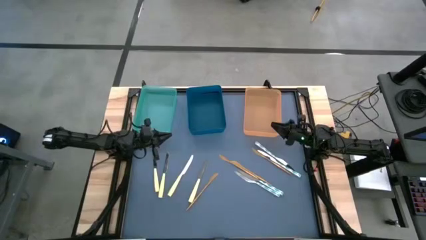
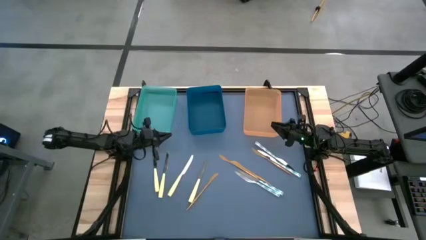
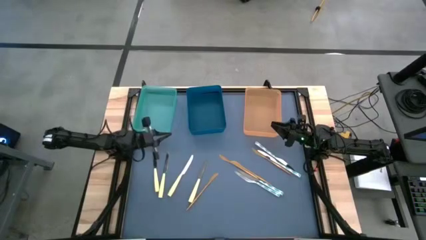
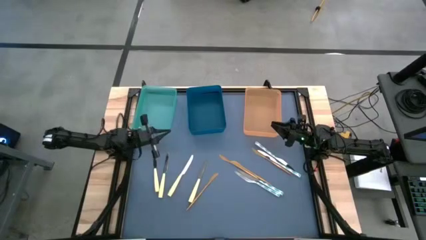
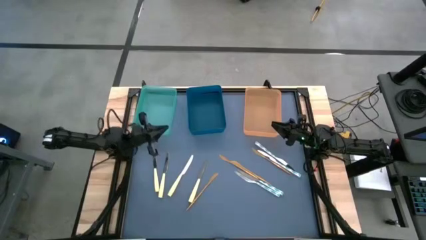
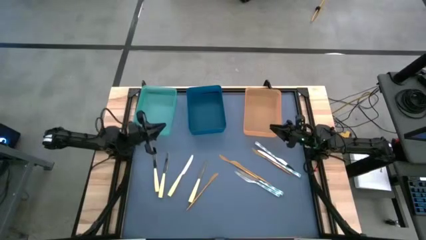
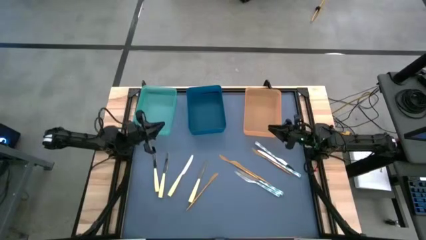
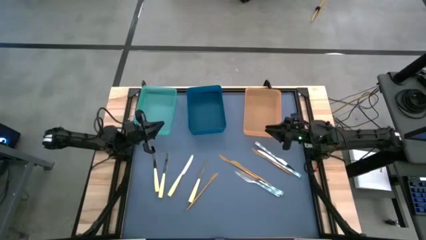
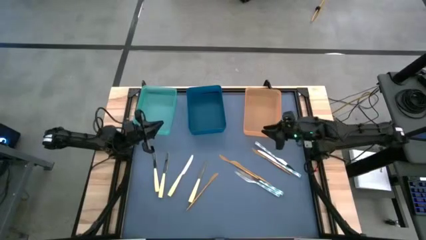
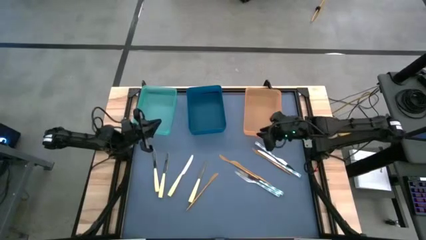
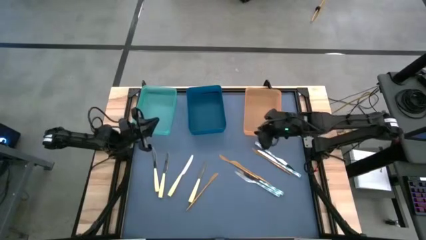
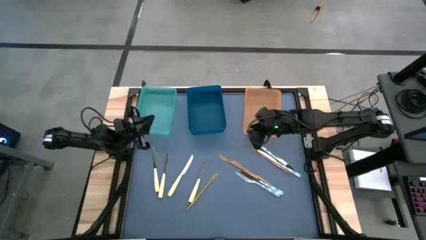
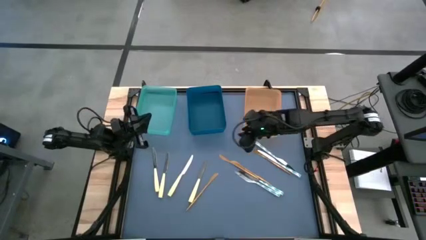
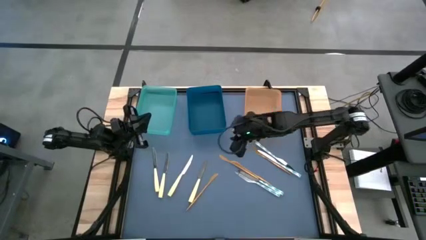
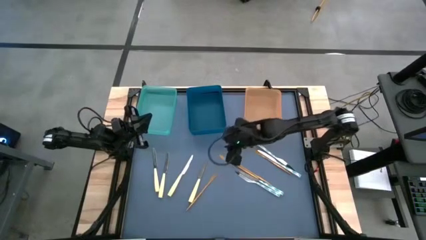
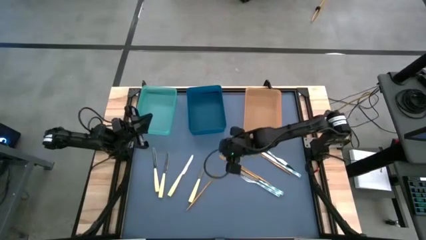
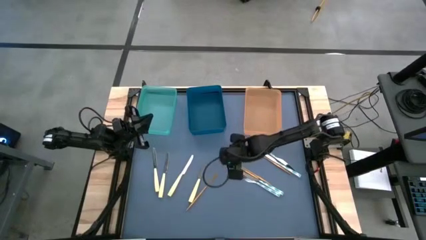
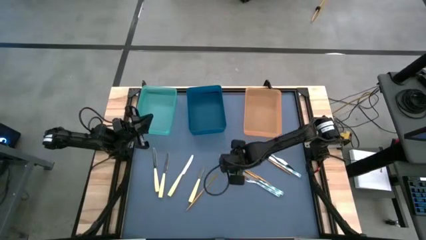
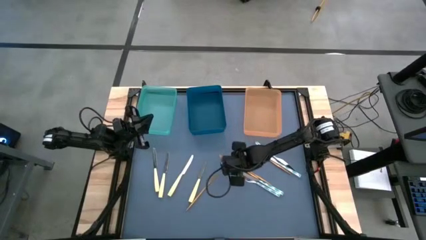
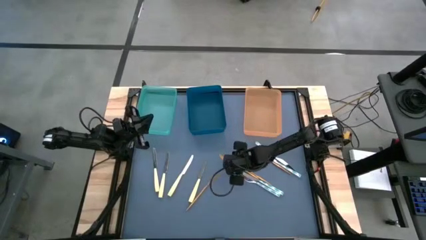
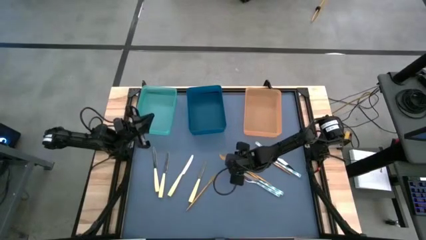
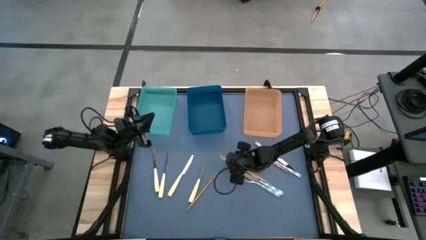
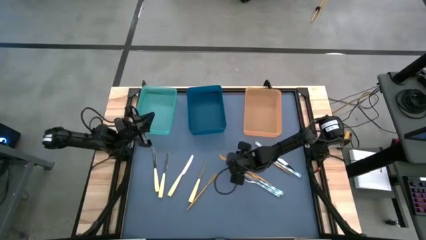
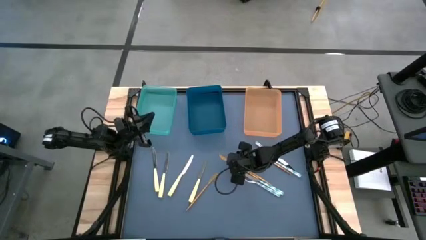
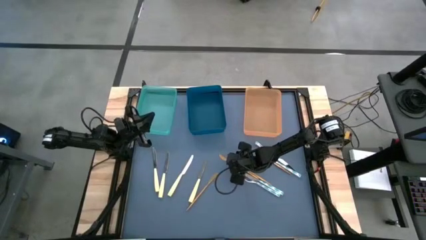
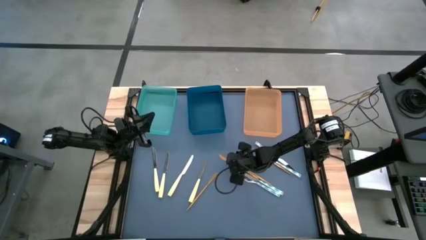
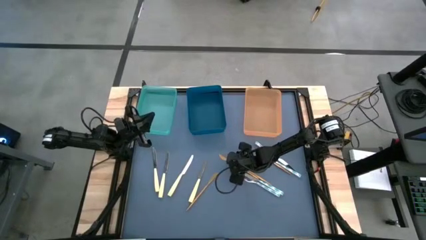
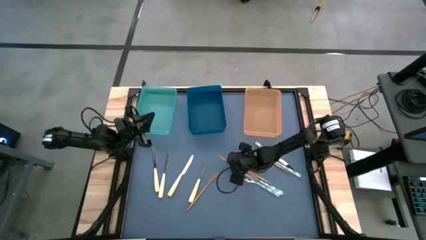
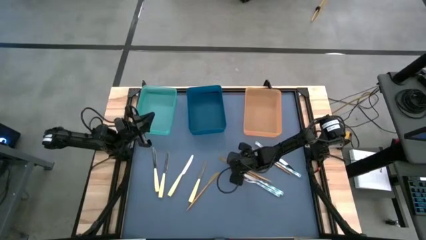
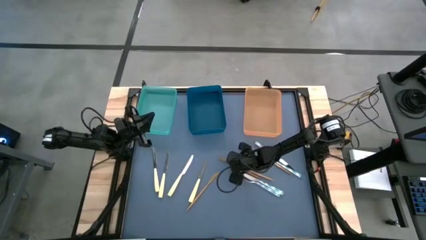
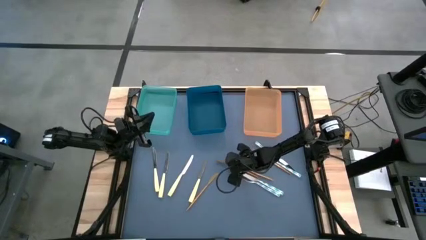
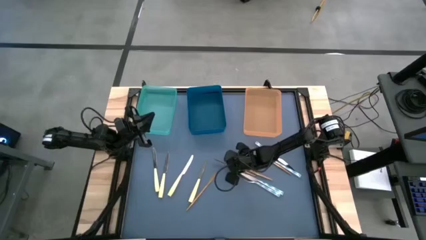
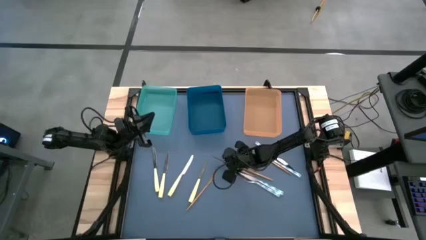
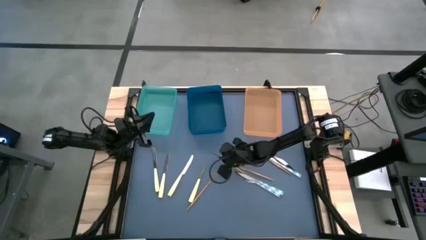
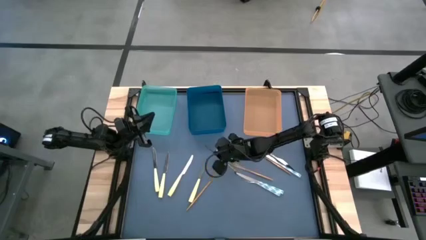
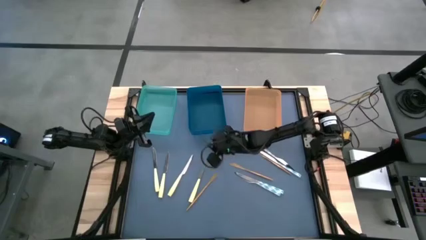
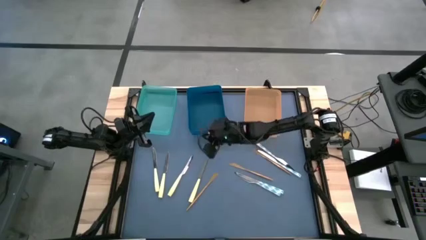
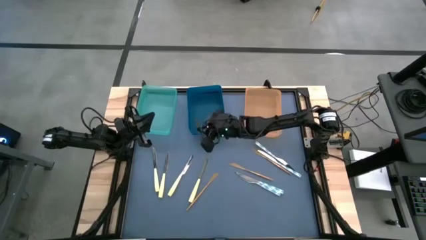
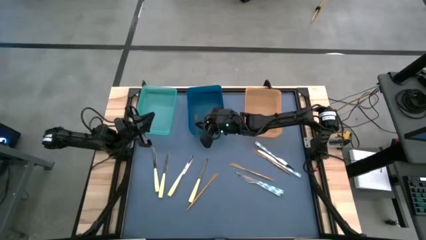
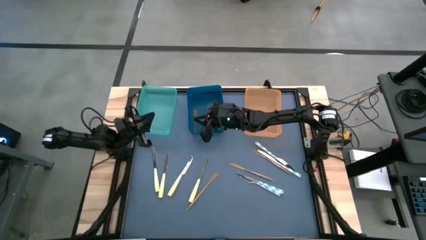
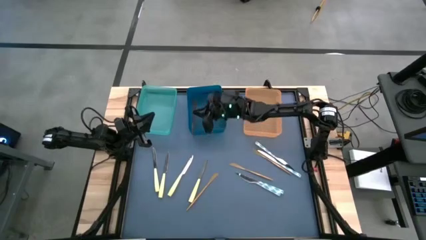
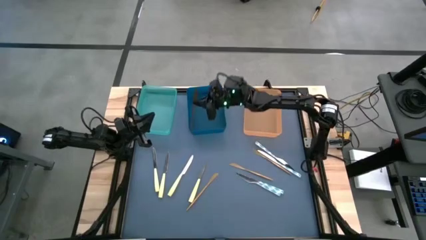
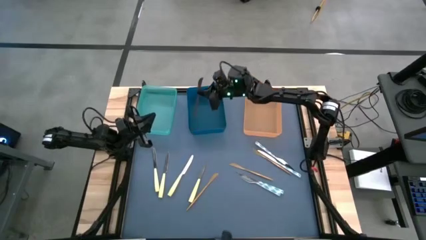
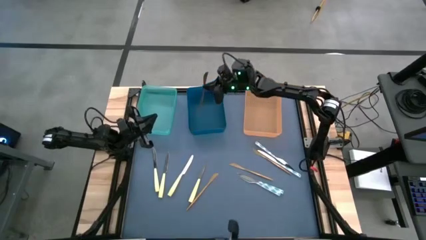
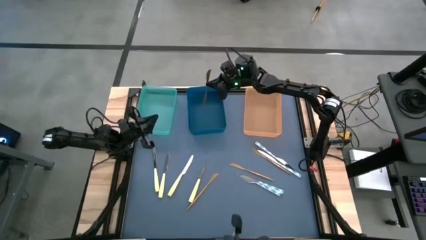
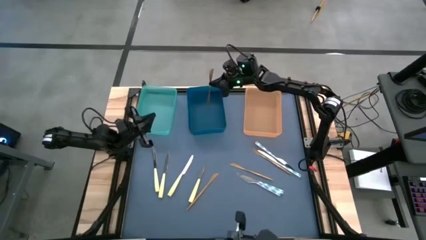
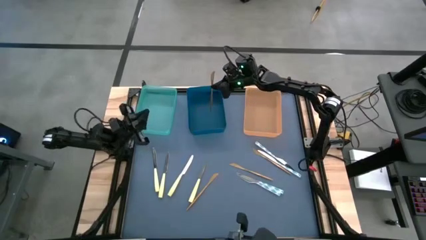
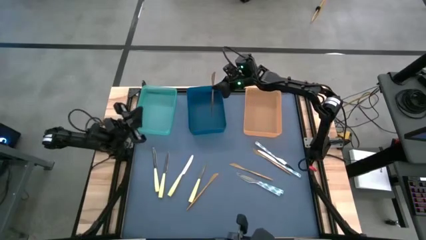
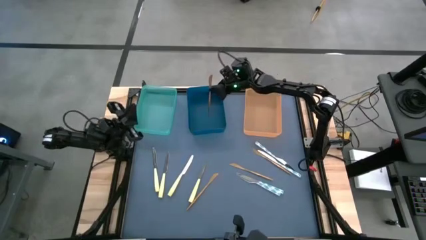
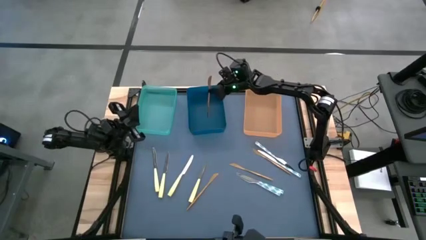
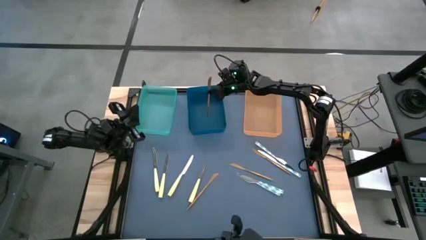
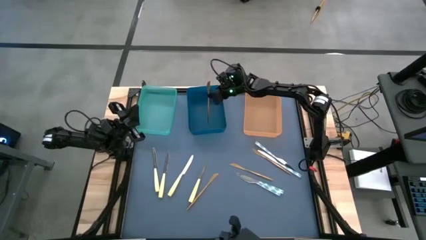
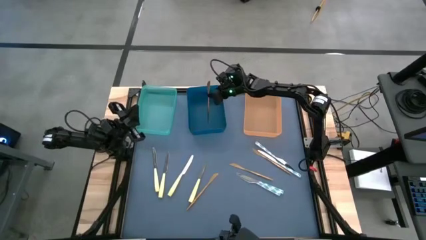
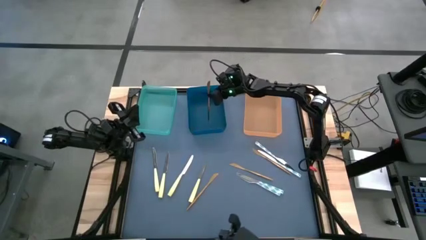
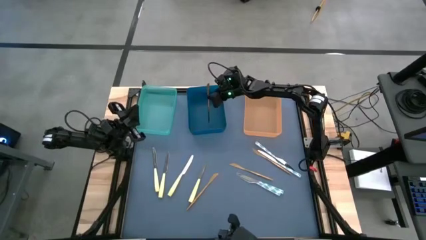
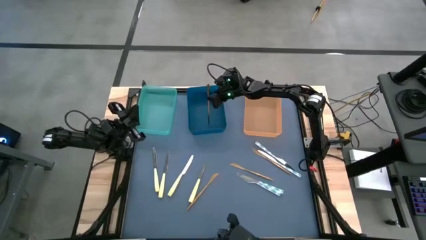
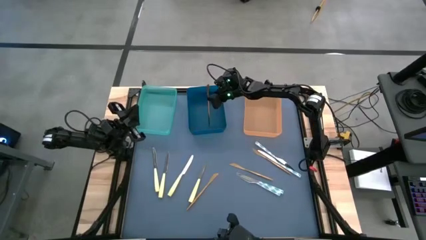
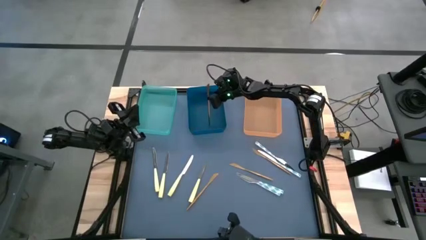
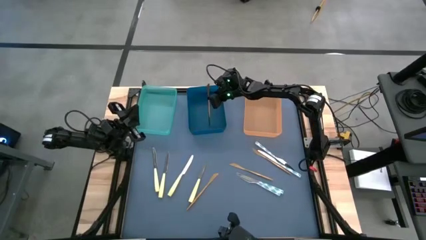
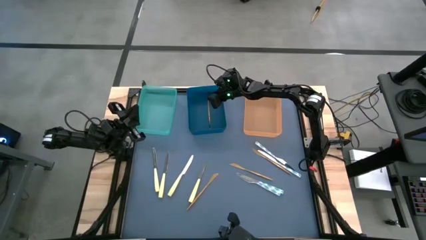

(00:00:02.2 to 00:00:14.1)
Task: Sort silverware by color (type)
Put the gold table knife into the blue bin
